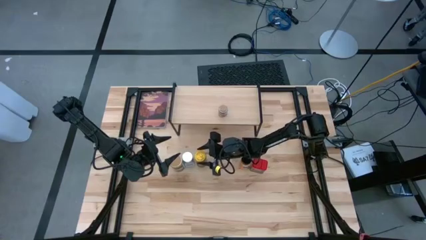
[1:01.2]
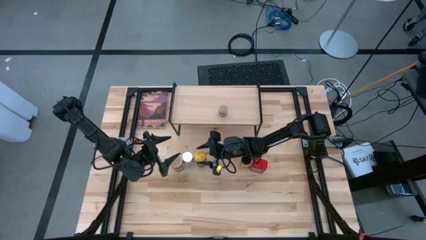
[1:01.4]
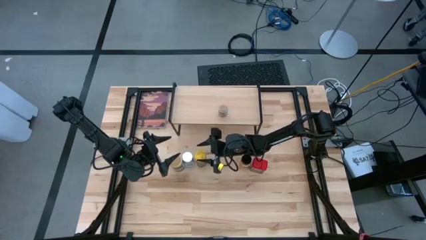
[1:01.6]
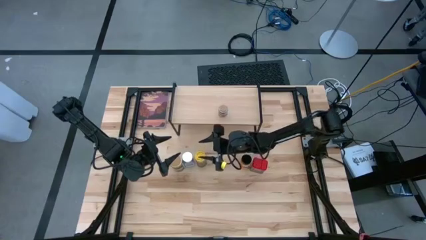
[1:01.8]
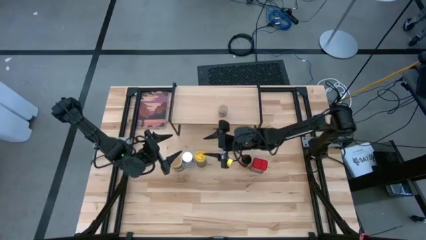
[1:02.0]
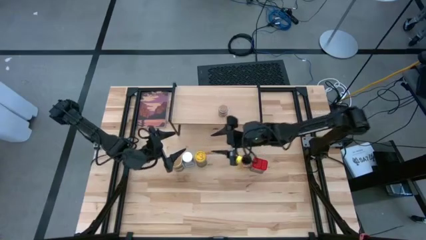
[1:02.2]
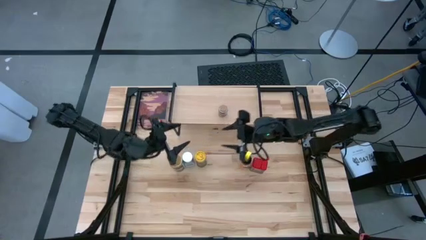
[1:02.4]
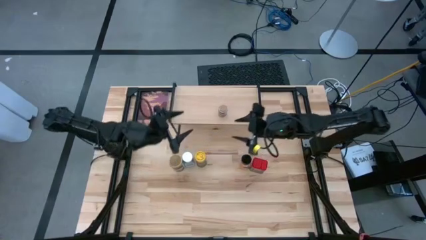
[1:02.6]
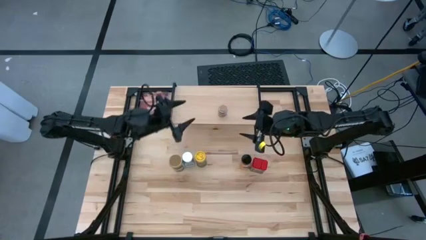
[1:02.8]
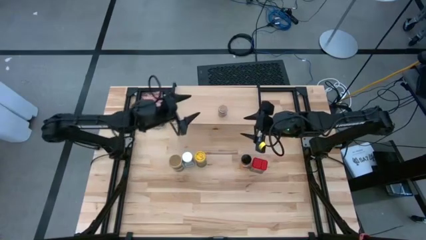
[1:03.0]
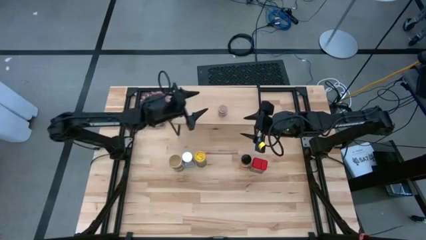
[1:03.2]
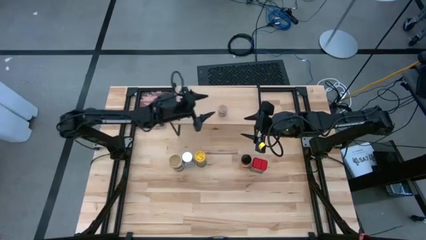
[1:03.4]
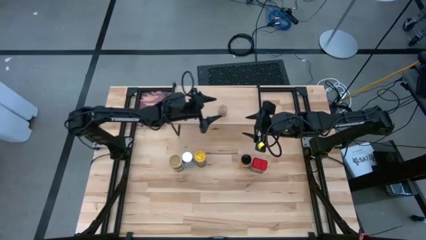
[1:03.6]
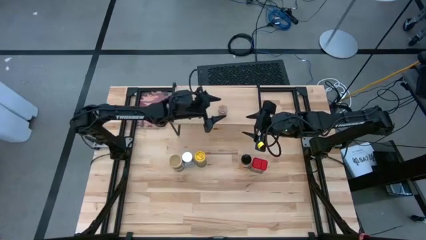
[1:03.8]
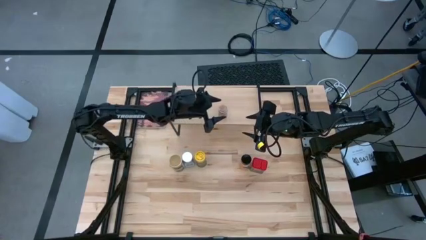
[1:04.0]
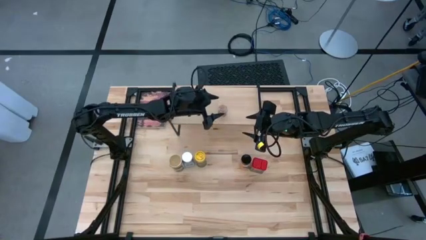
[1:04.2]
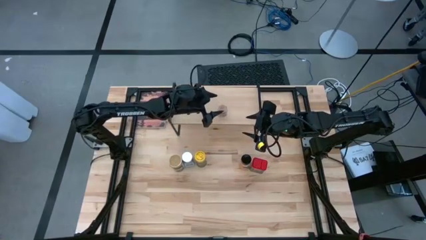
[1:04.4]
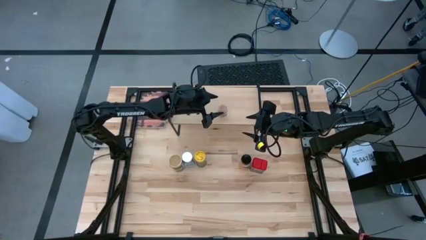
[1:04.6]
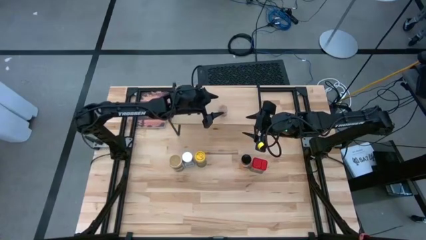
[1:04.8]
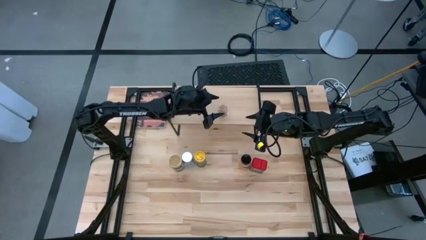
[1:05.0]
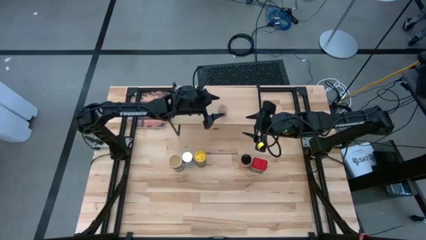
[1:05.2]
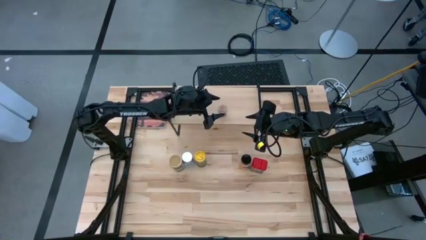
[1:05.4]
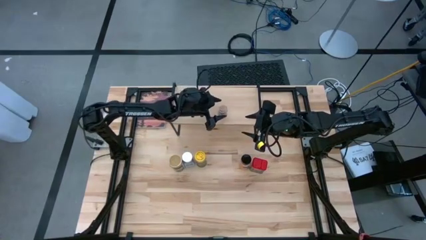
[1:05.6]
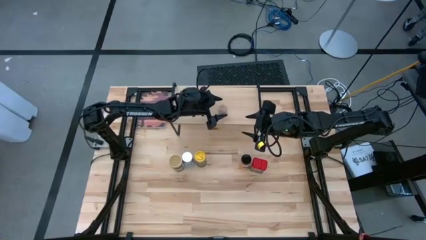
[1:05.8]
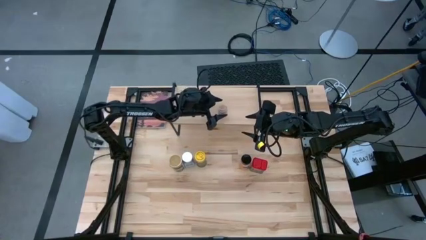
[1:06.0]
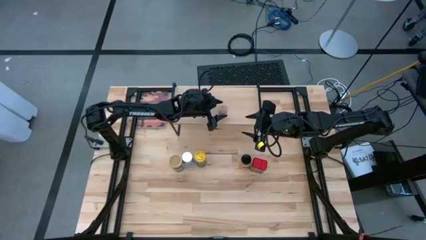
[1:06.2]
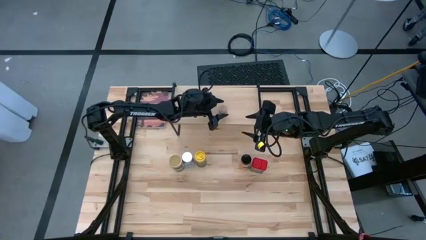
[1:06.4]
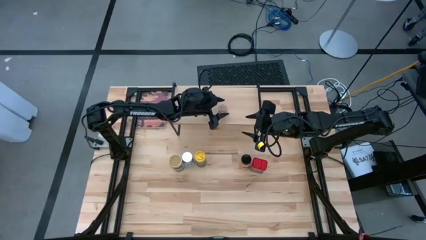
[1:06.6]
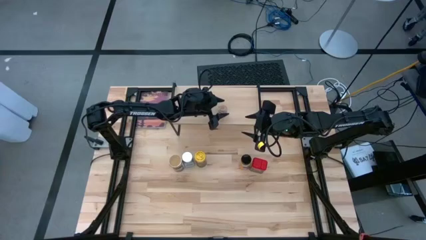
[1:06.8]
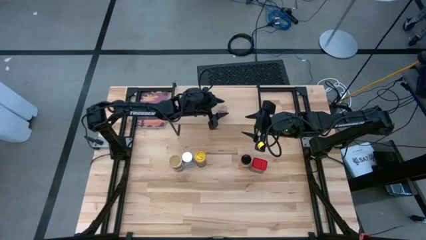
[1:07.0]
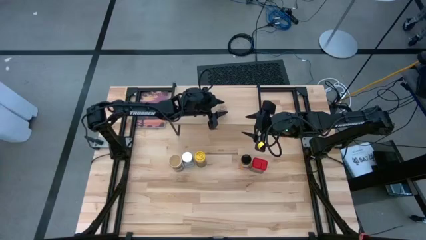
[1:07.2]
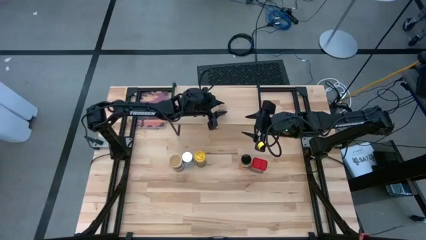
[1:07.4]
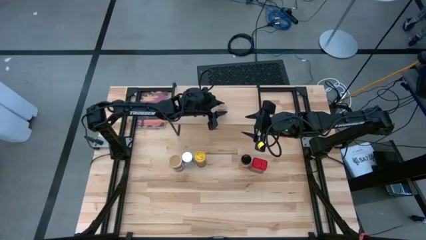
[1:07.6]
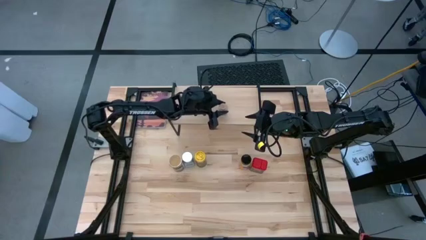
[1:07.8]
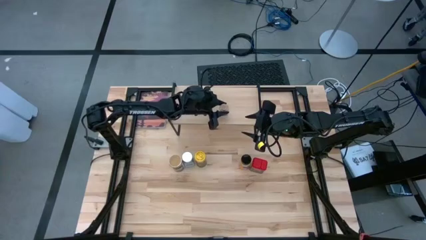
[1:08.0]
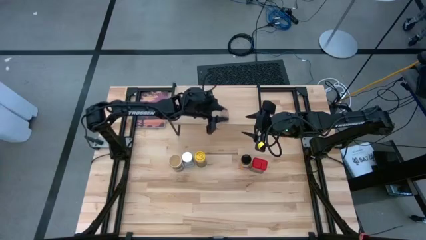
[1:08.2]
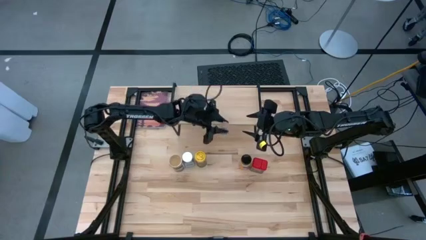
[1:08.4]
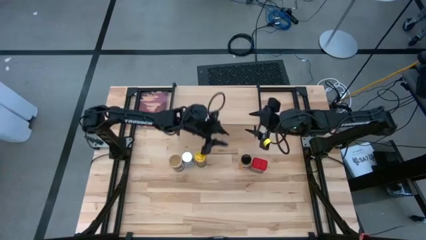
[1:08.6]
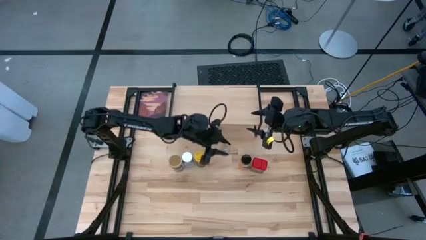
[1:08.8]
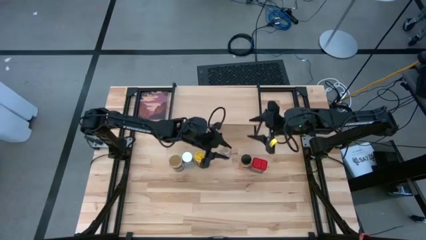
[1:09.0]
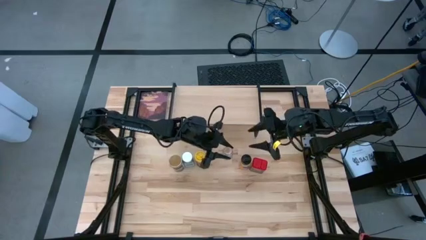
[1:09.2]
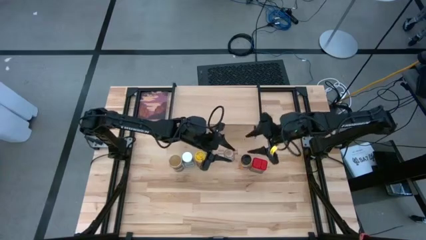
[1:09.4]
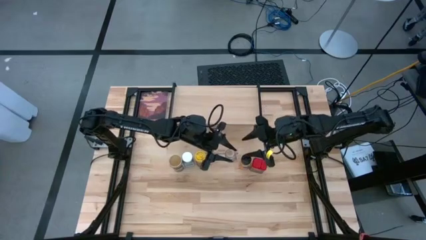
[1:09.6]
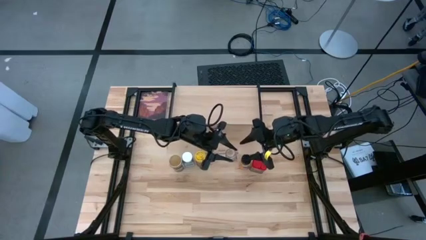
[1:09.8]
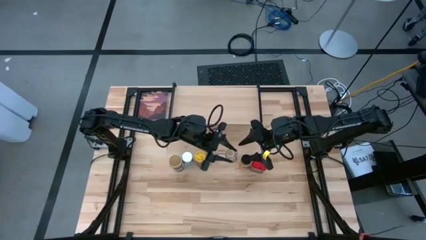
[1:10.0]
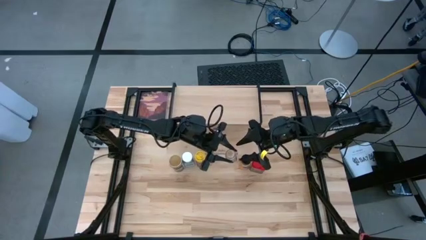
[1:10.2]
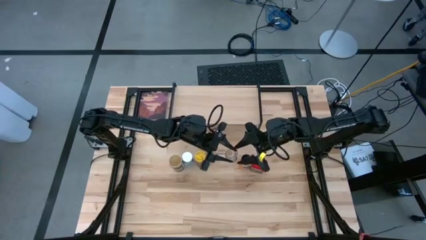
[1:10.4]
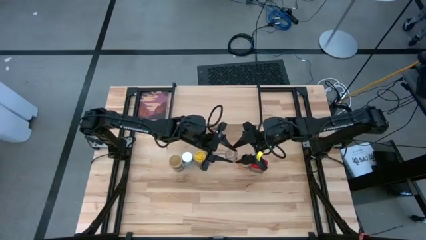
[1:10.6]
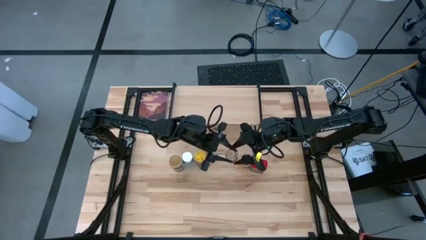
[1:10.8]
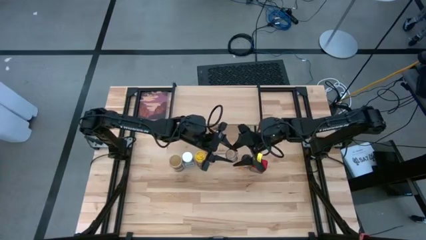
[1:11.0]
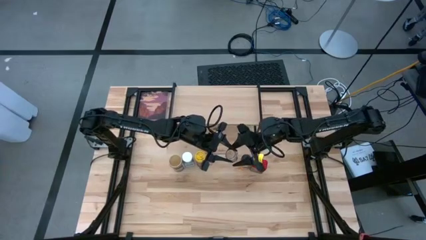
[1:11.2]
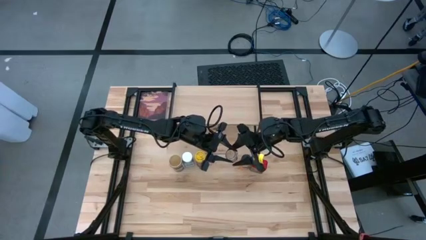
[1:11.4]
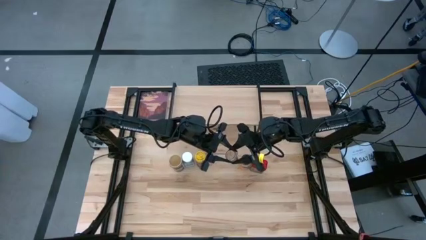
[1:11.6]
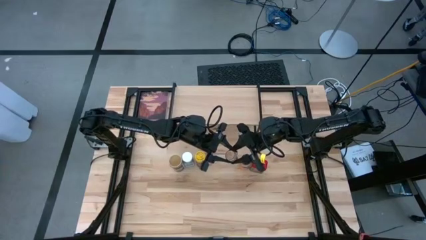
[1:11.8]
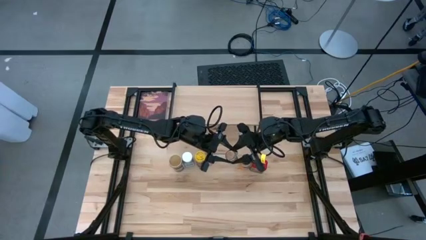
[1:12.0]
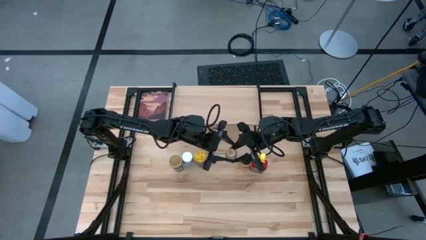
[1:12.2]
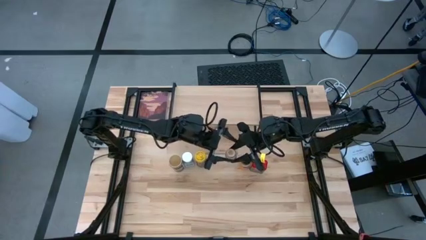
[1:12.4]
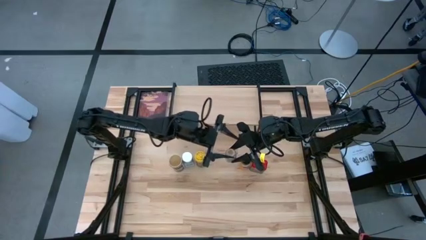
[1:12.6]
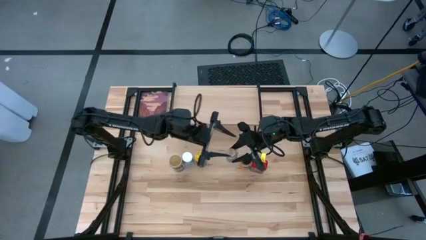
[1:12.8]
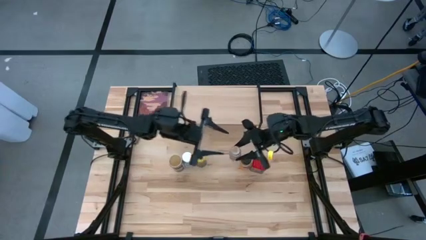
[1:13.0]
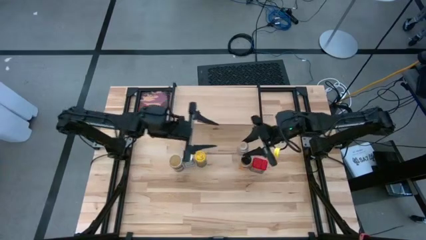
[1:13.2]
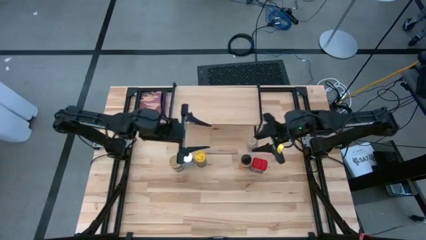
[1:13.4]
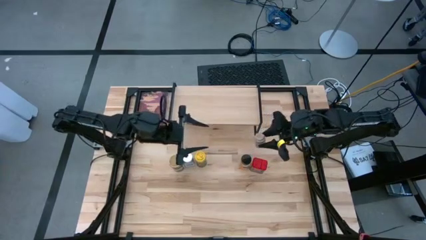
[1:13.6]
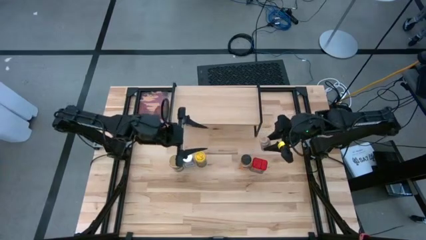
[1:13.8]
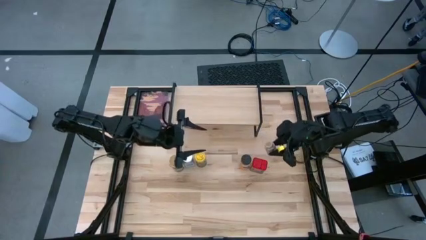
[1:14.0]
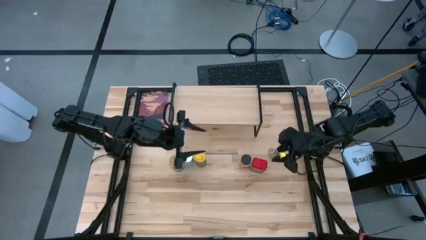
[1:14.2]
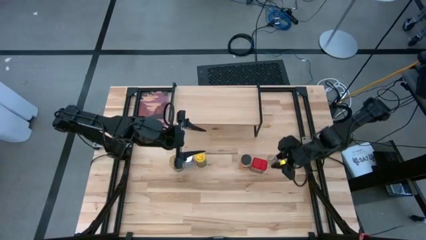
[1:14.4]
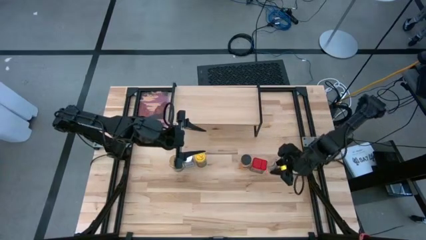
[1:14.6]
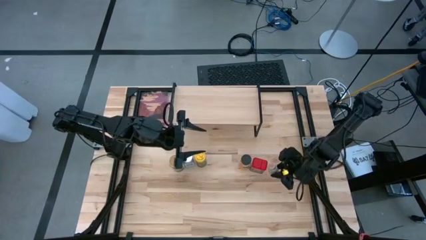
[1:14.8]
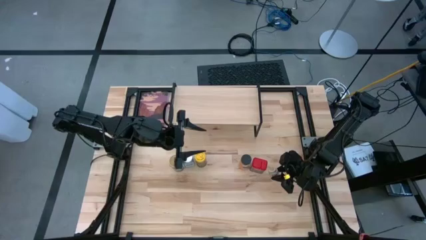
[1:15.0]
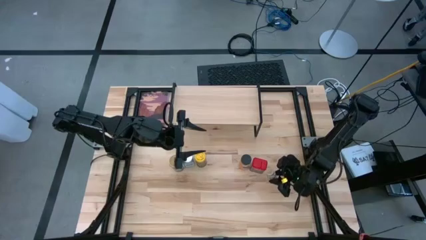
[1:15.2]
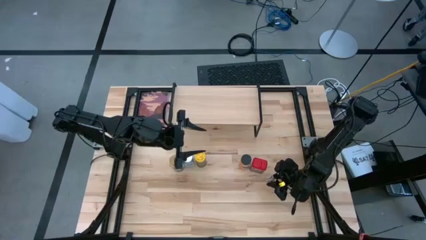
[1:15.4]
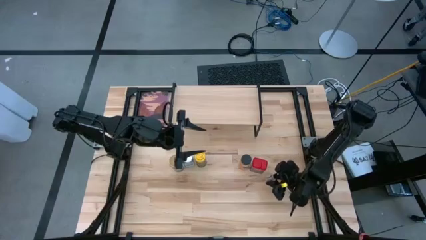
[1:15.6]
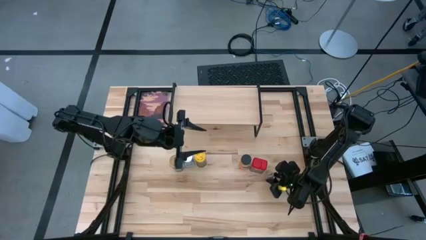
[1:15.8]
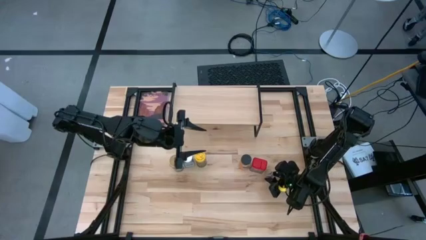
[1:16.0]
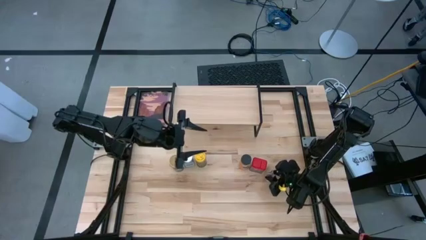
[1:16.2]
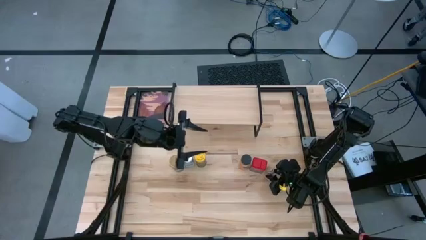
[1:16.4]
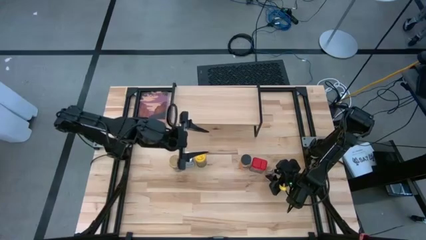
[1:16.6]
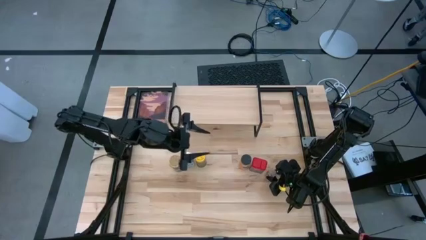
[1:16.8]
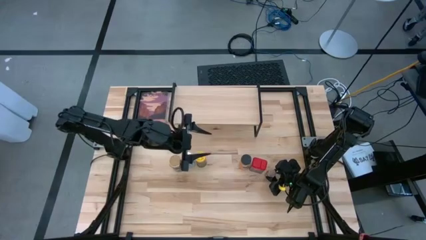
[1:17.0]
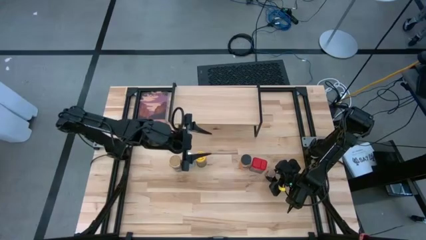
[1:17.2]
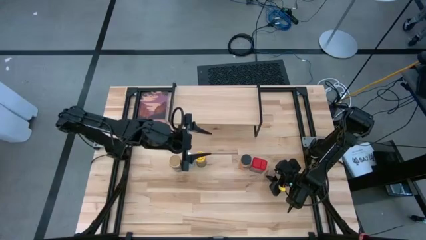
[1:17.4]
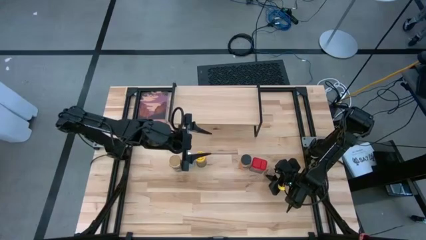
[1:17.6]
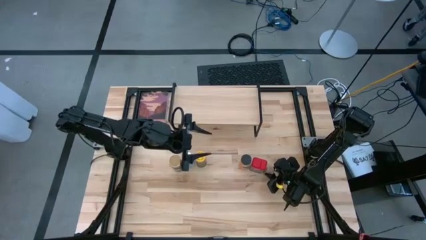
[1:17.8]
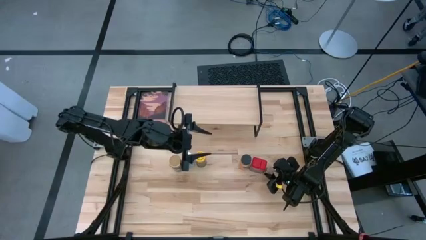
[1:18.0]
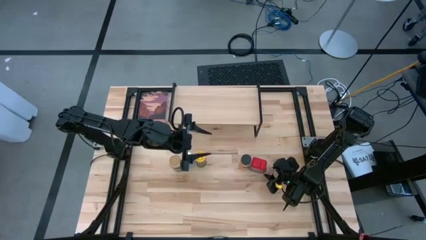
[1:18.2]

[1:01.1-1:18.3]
Task: Shelf spices
Remove the brown seasoning bottle from the shelf
